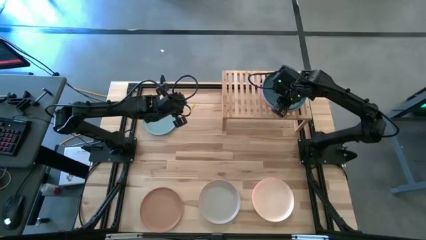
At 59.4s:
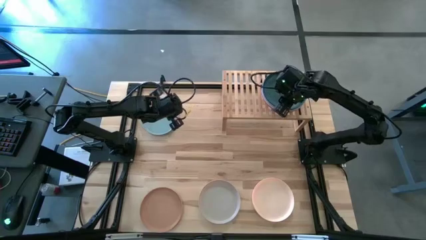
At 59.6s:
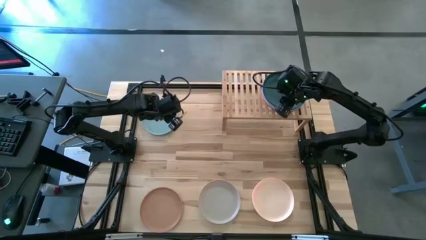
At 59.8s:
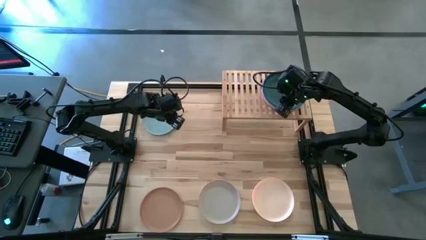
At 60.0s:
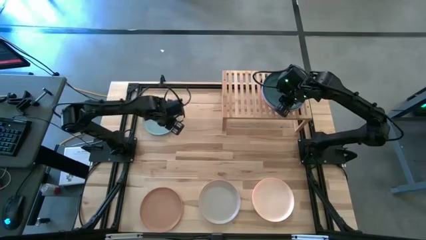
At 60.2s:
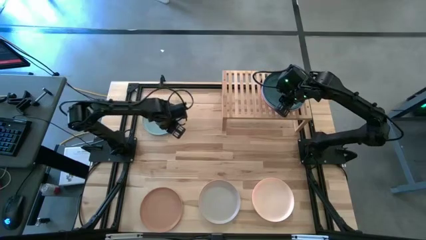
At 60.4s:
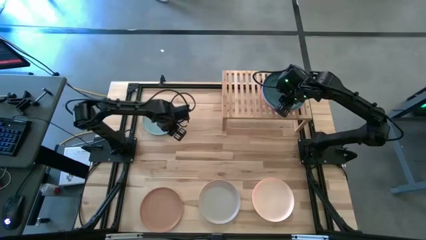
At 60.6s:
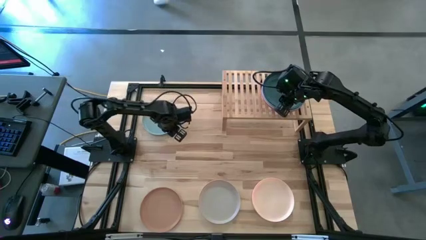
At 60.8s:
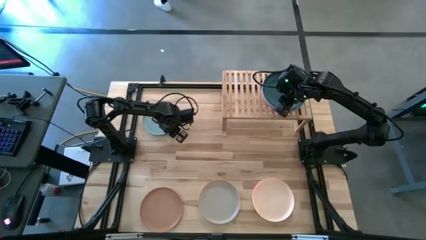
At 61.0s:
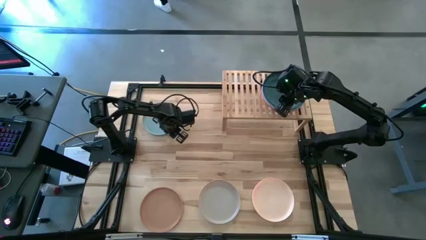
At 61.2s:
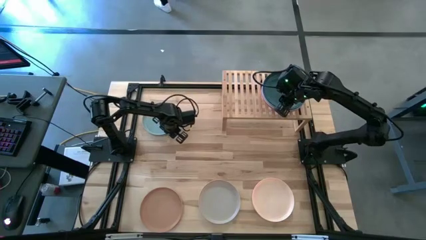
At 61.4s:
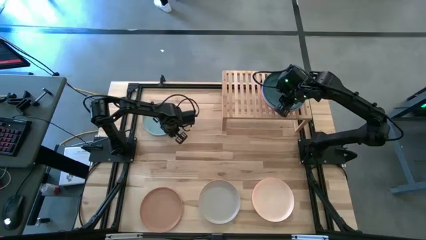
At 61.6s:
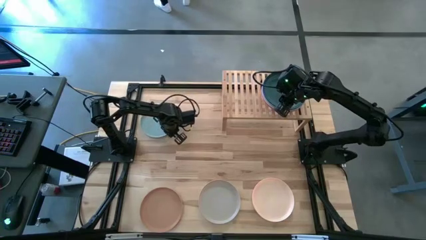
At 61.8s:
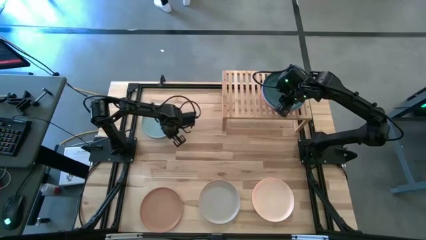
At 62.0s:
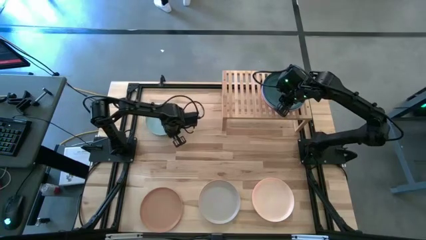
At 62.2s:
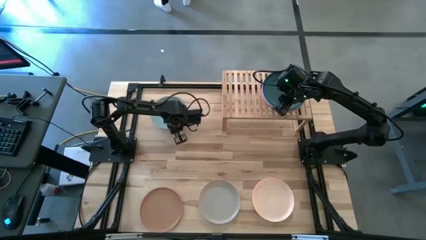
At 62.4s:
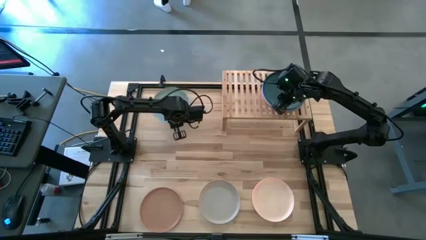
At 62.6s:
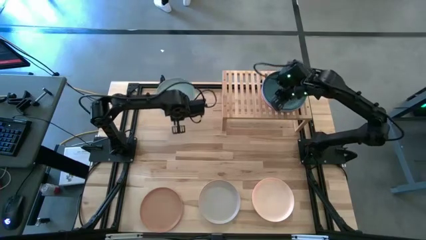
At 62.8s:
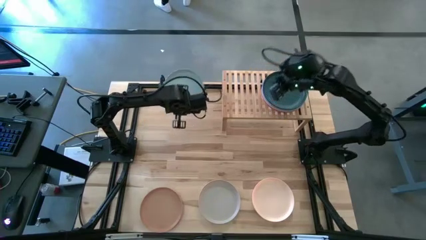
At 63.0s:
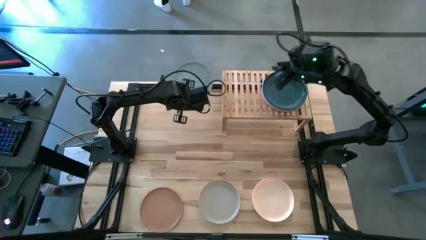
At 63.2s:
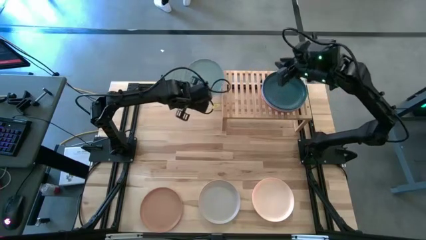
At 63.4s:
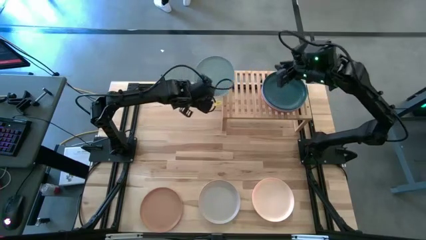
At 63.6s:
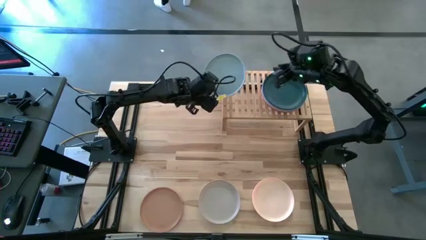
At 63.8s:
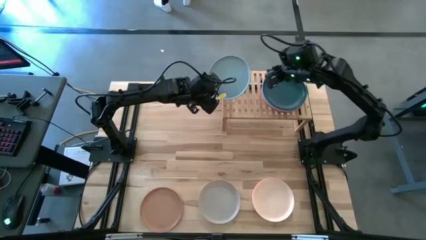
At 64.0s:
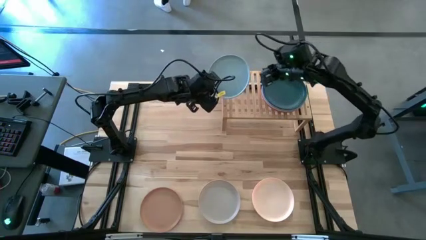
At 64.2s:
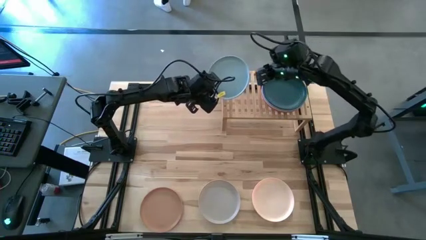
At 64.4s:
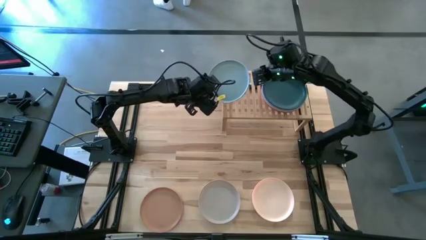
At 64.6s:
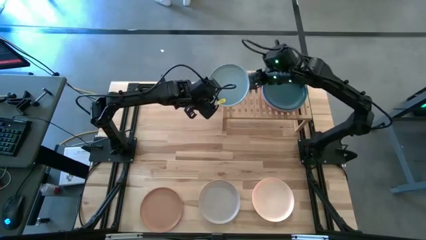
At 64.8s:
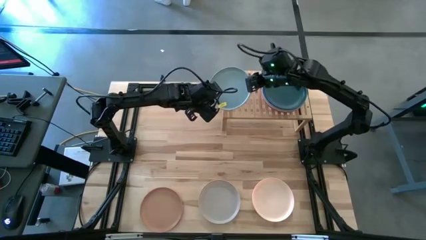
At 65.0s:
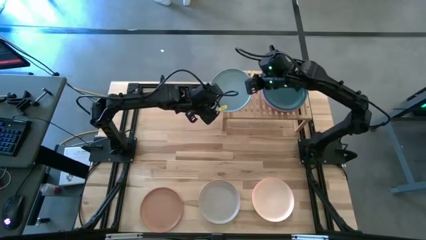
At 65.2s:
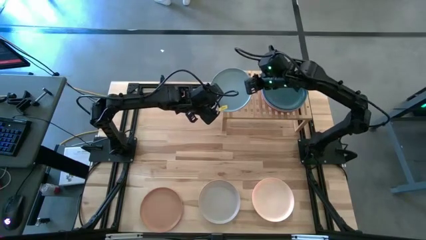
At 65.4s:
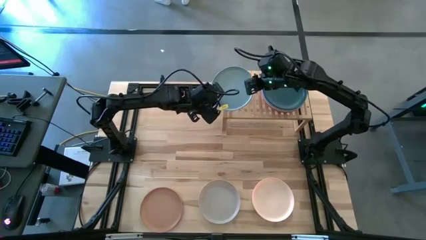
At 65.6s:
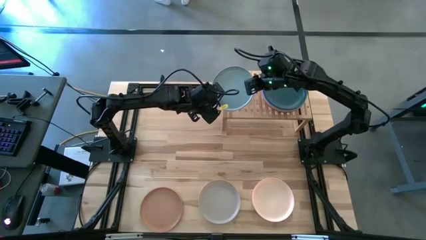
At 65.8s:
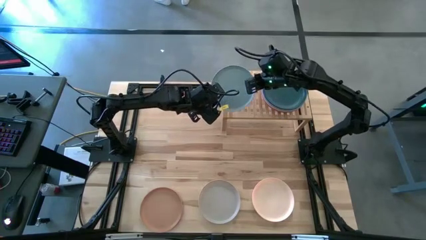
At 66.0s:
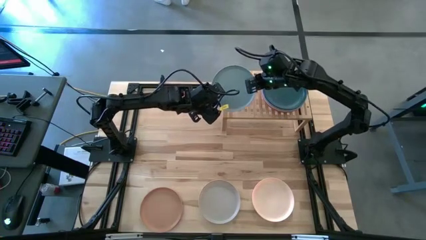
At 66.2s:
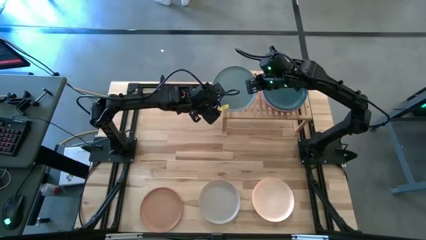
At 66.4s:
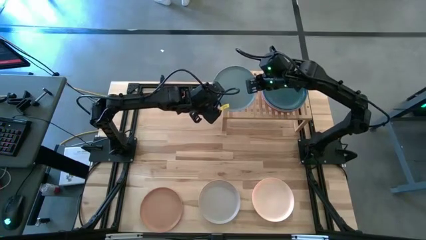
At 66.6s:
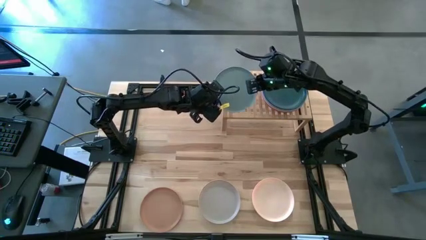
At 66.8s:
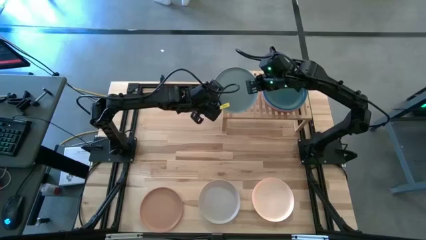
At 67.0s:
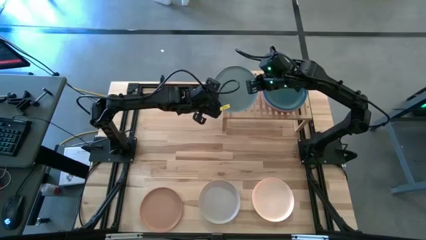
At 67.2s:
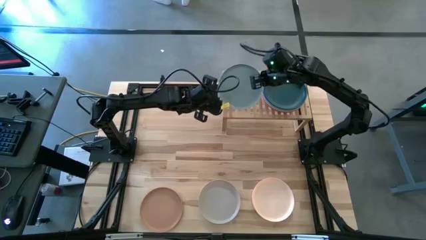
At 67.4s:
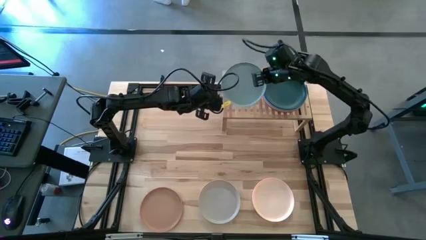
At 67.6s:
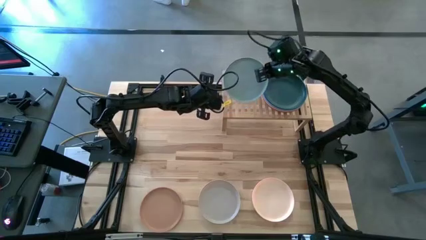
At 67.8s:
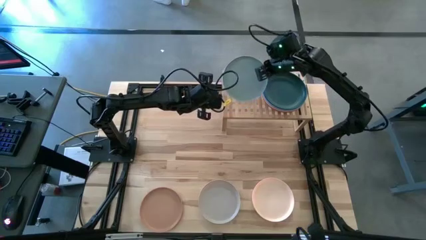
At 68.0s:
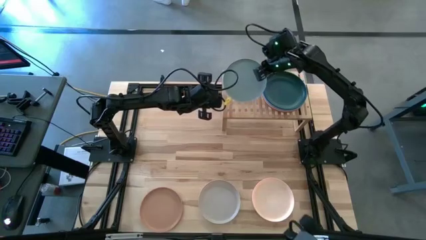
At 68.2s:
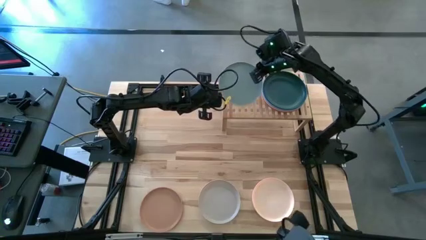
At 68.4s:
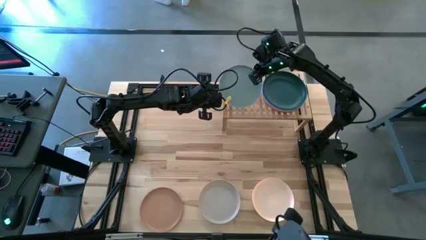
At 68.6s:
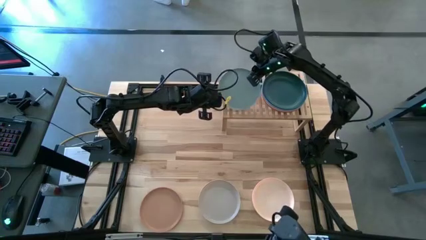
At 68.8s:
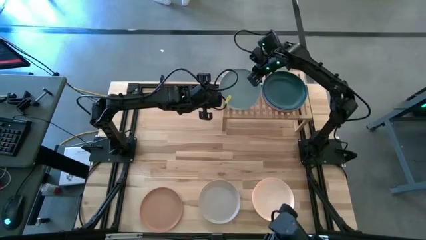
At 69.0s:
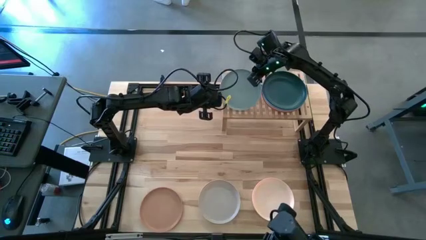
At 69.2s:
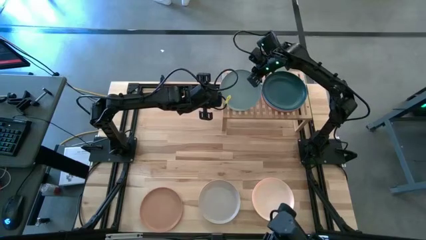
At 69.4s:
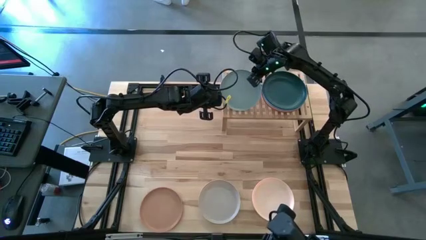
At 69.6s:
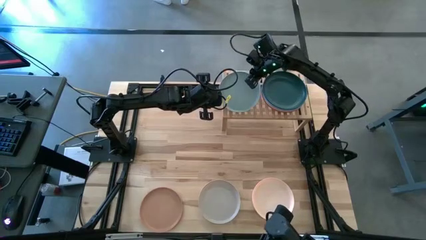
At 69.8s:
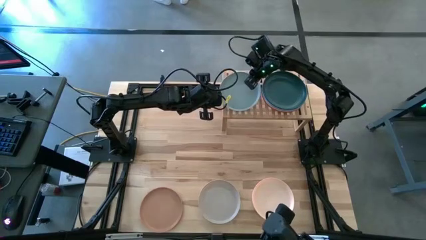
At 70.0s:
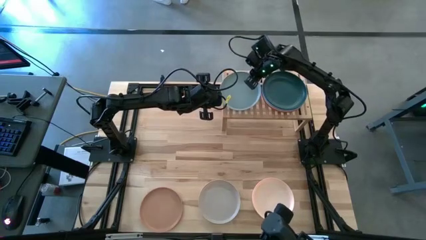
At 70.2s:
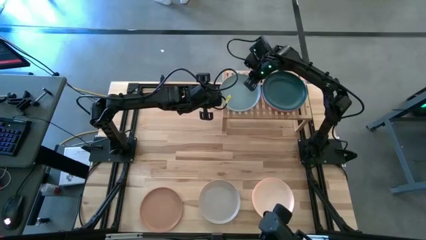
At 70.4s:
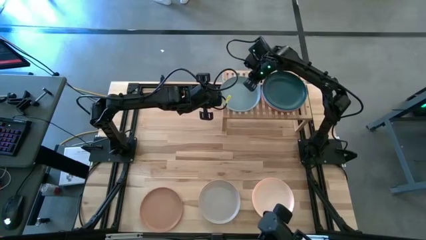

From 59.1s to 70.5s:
Task: Place and stack plates onto a shelf
Put the light blue on the shelf

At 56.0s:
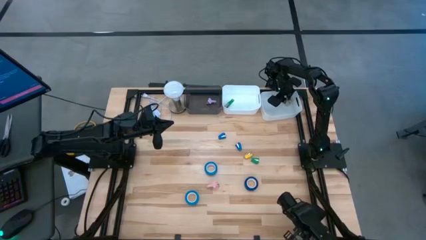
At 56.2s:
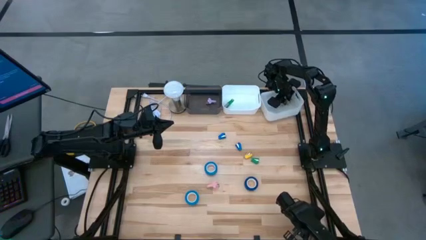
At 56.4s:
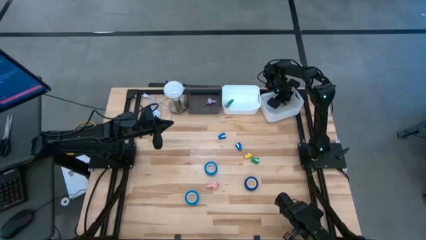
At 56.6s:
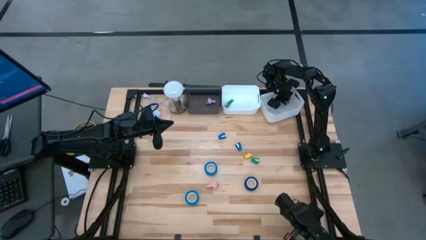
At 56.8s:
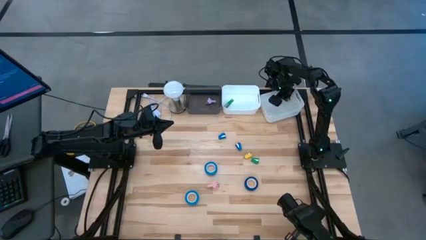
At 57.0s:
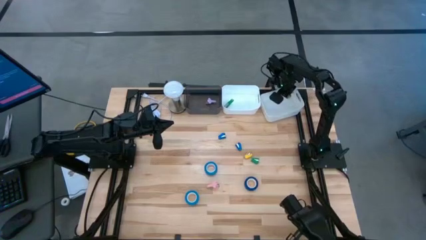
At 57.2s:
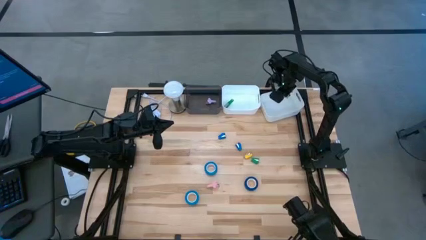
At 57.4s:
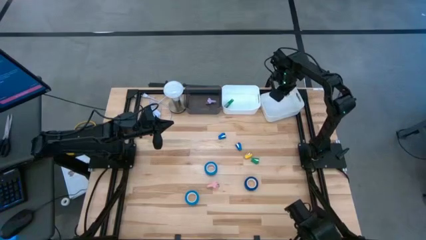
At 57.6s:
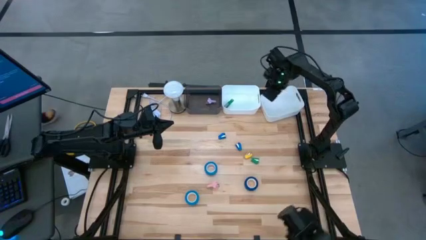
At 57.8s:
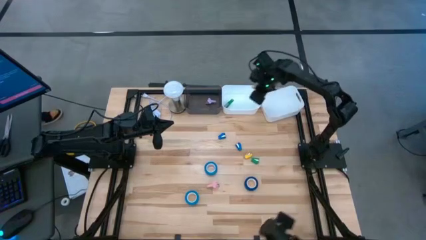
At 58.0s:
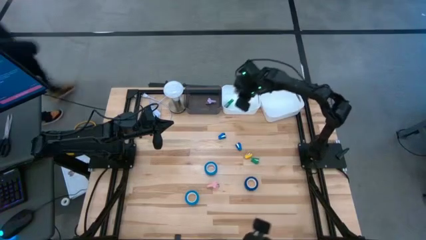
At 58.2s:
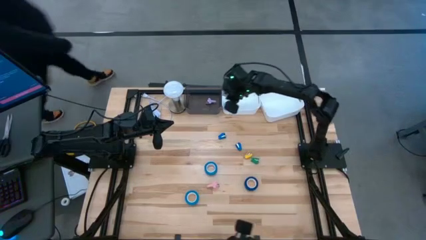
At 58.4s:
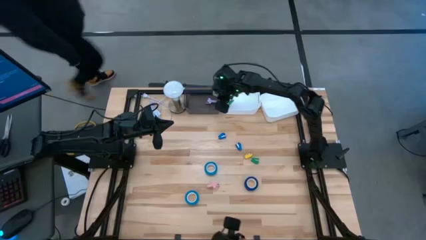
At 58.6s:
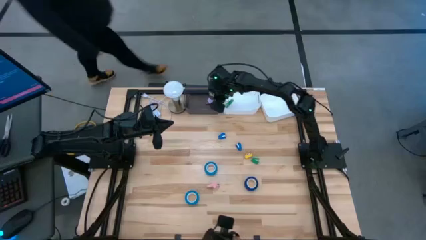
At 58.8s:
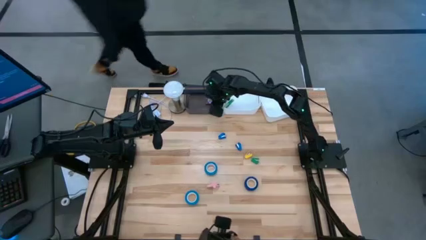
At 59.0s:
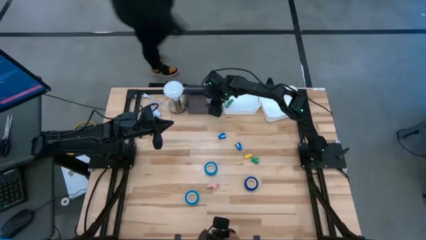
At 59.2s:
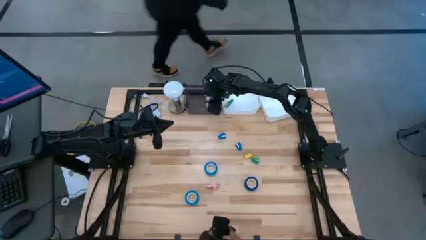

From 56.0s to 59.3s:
Task: Pick and place Stapler, Stapler remover, tape
Put the gray staple remover into the black bin
